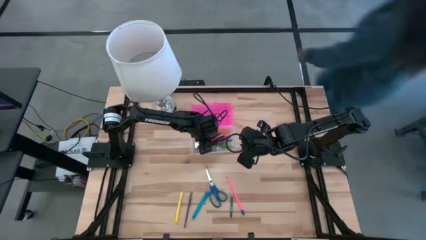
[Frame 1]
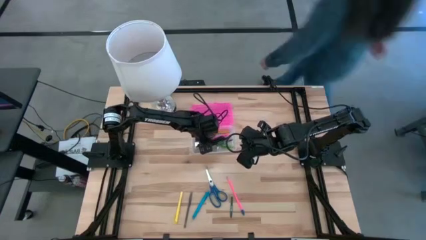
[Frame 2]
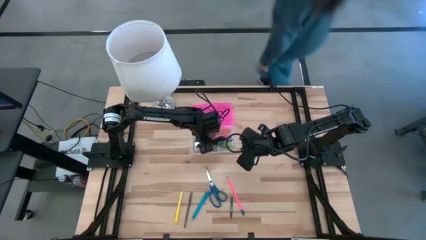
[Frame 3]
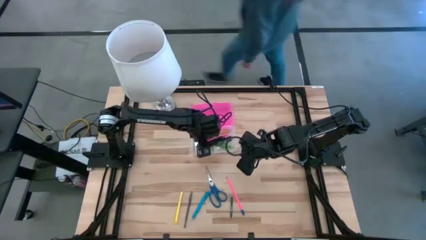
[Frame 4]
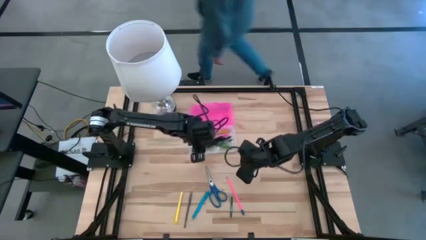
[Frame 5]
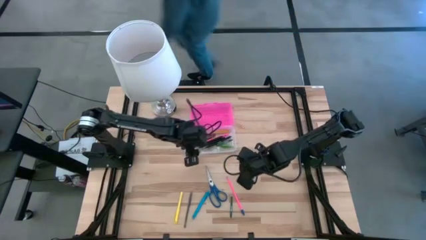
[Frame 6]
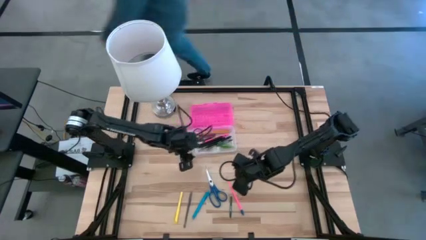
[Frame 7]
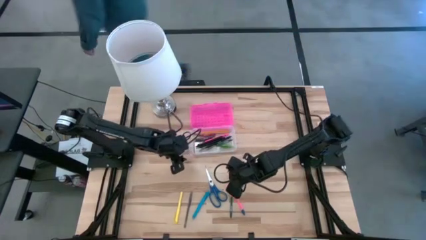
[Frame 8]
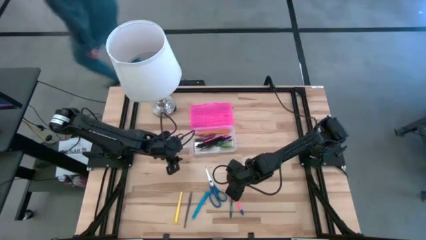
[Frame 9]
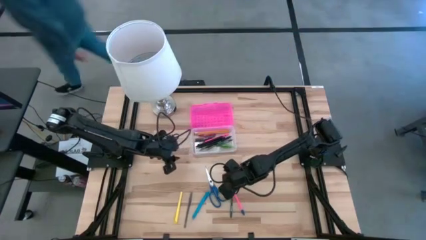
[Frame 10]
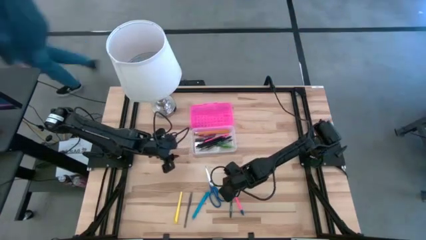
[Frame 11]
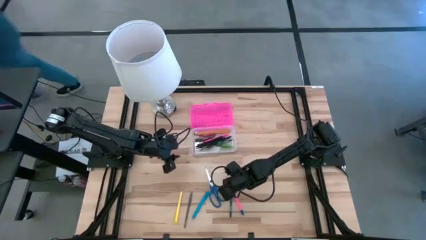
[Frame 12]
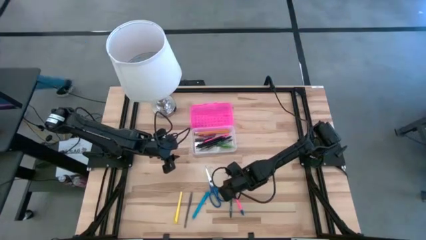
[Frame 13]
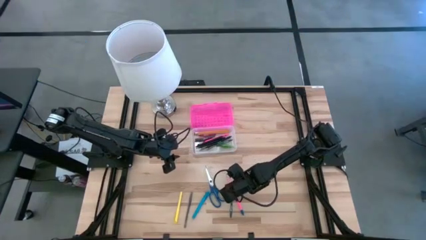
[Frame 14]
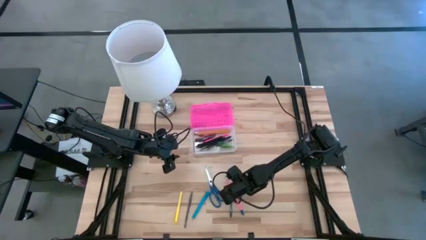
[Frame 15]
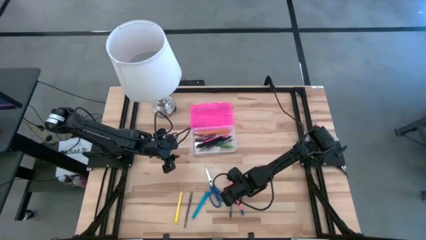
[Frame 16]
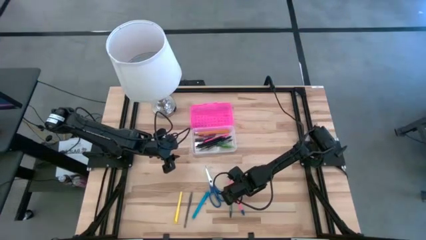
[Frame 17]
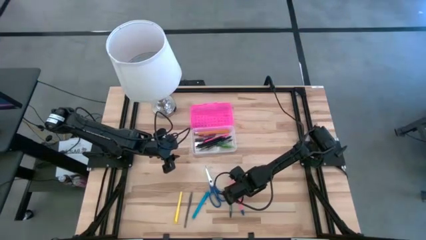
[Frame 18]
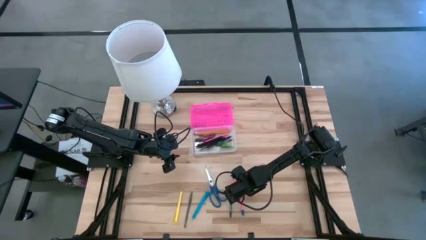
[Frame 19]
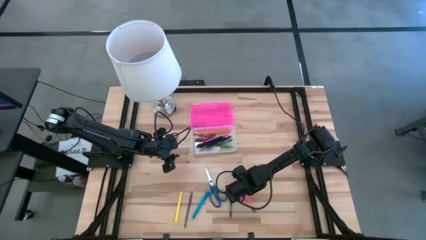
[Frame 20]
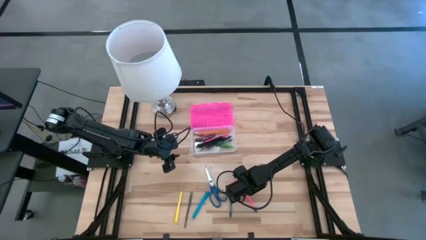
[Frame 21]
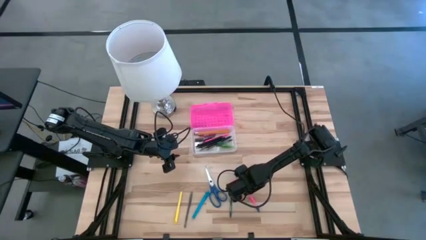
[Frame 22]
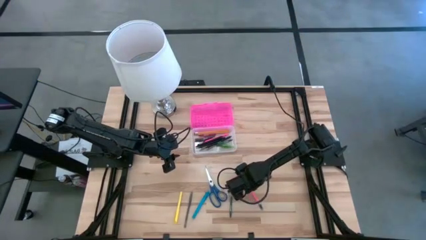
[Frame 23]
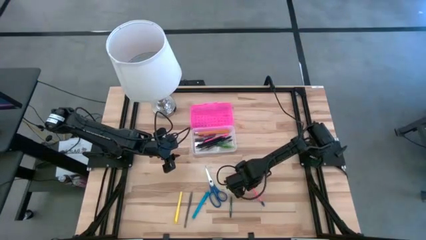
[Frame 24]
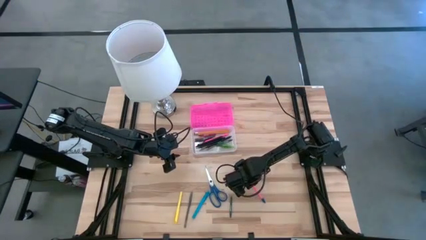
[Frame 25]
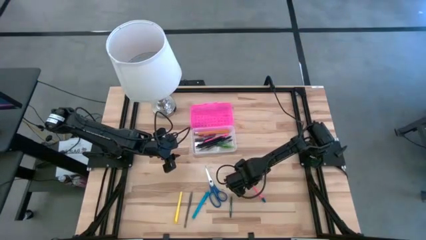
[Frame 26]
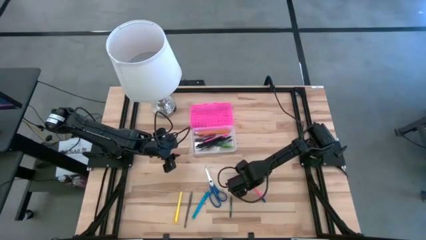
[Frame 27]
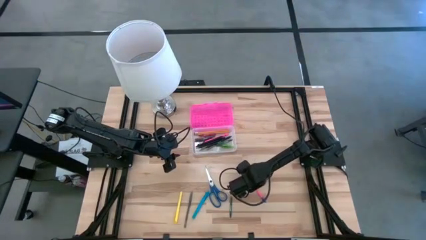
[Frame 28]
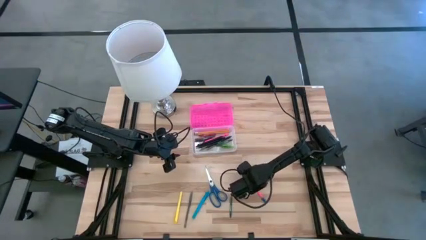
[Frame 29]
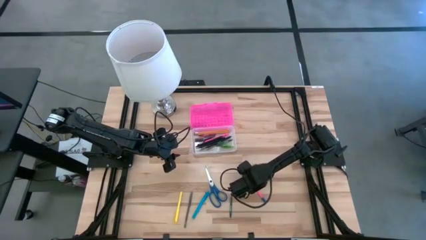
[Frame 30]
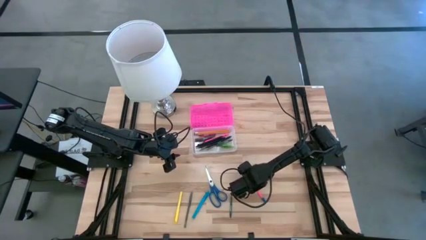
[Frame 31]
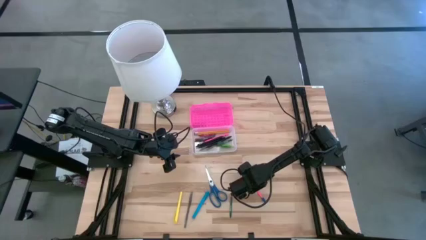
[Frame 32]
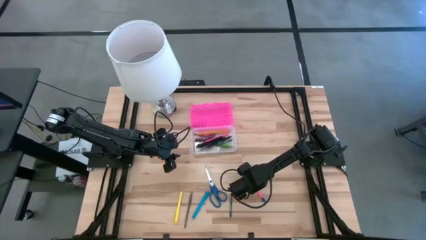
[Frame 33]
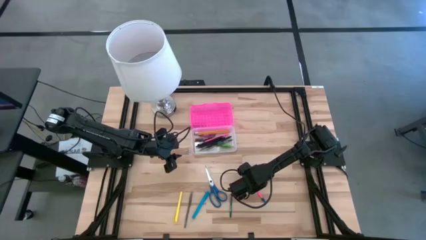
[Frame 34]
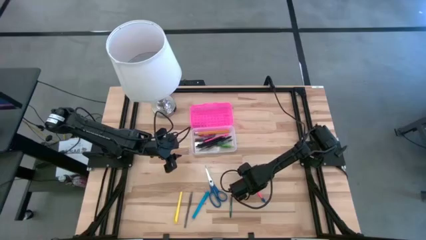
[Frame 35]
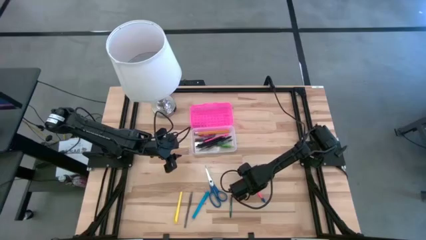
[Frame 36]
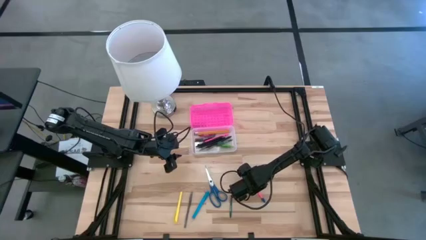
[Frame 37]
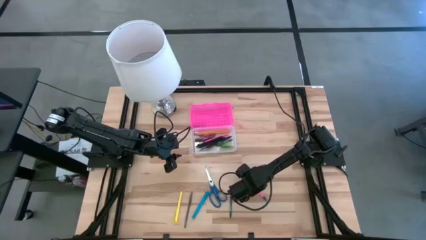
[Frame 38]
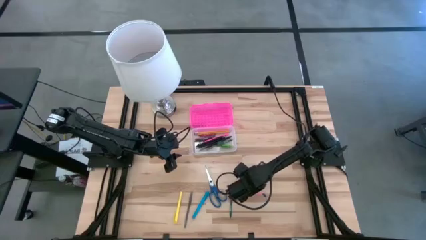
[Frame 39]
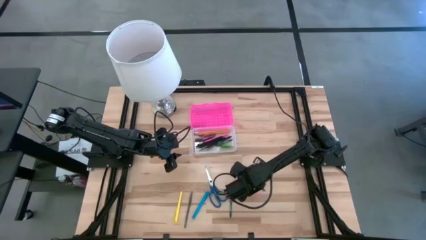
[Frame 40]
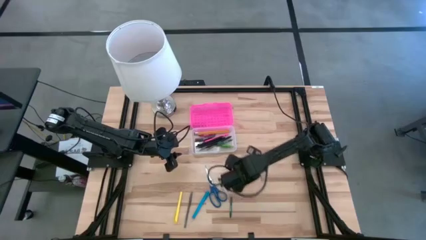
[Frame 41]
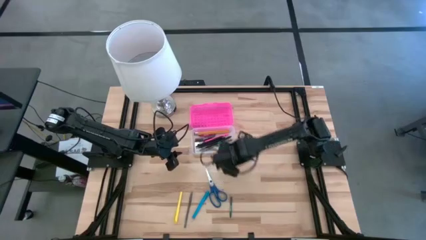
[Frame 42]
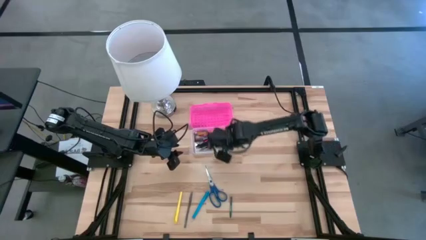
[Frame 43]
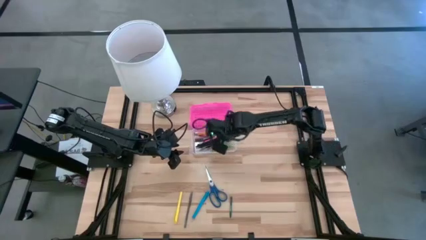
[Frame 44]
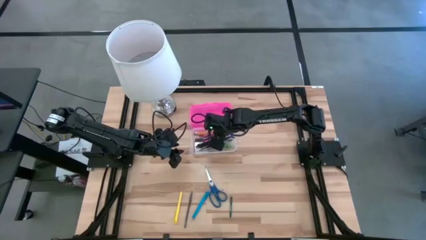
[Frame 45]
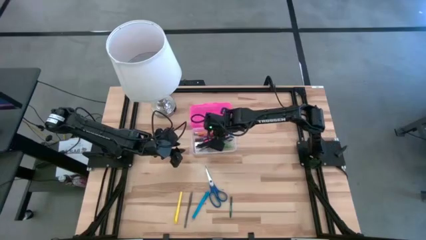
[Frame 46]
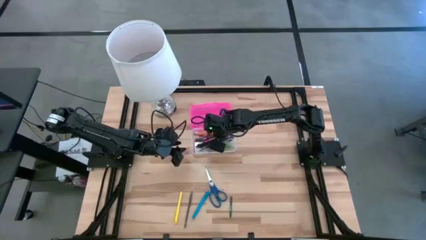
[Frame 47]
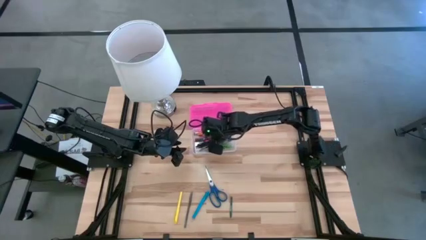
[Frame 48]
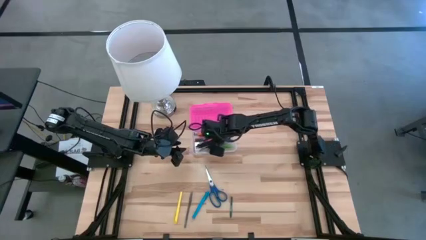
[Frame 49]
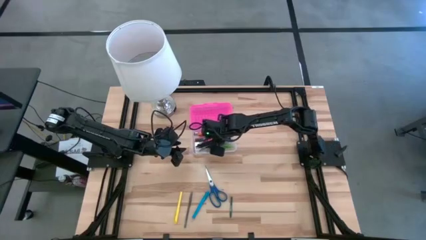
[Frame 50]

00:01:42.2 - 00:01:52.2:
Task: Pick & place school supplies into a supply box
Put the pink pencil into the supply box

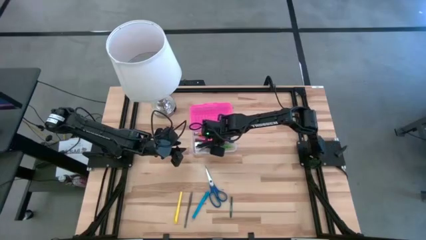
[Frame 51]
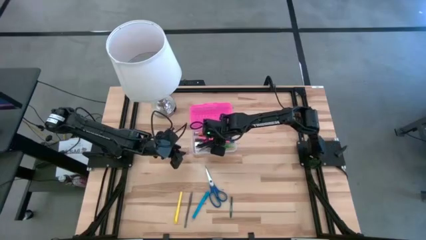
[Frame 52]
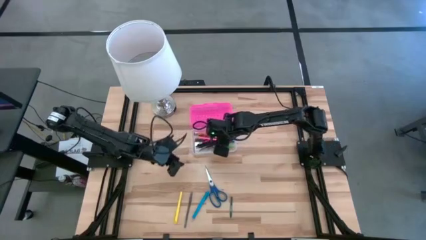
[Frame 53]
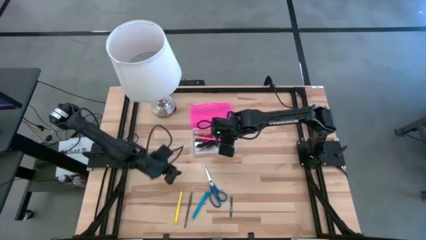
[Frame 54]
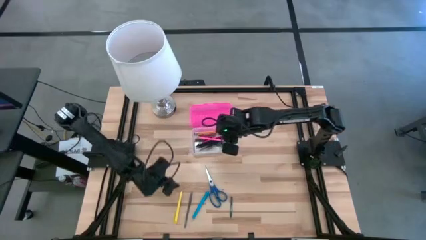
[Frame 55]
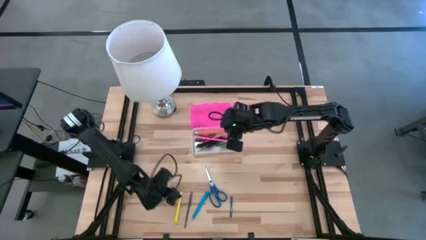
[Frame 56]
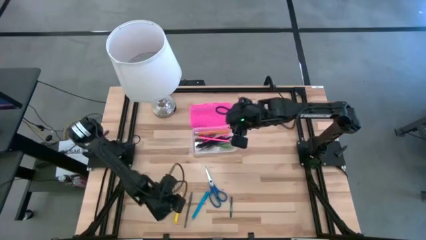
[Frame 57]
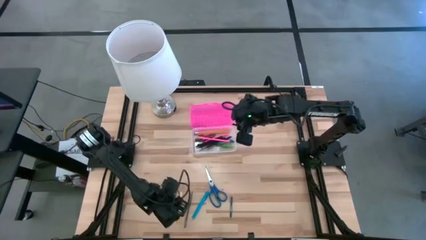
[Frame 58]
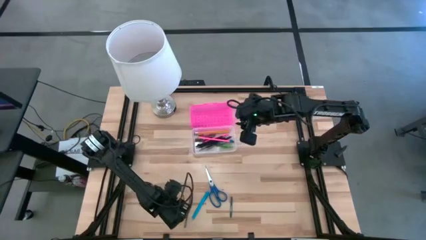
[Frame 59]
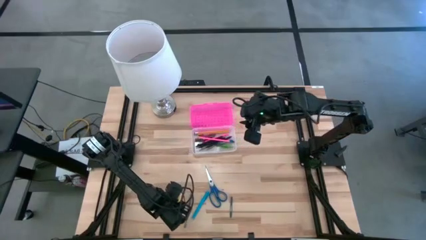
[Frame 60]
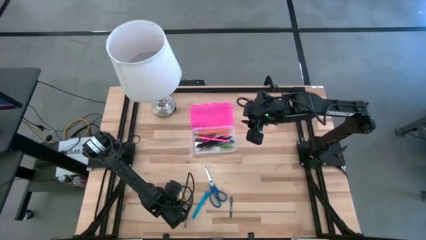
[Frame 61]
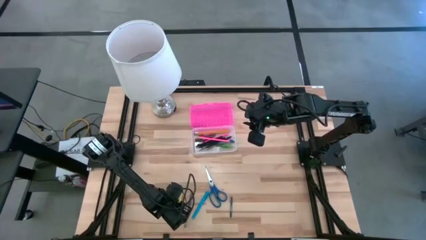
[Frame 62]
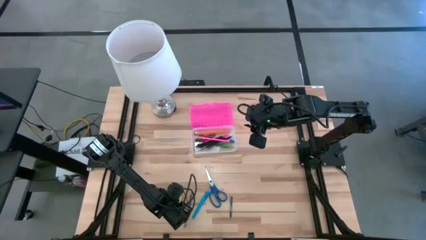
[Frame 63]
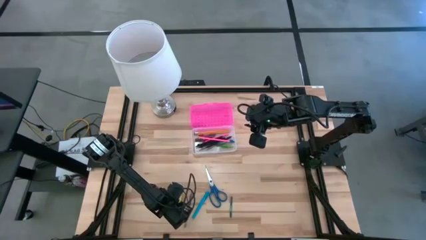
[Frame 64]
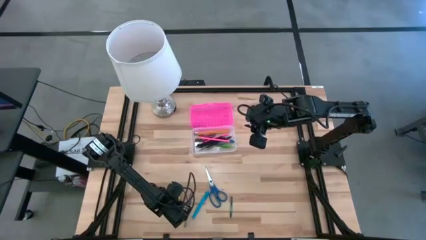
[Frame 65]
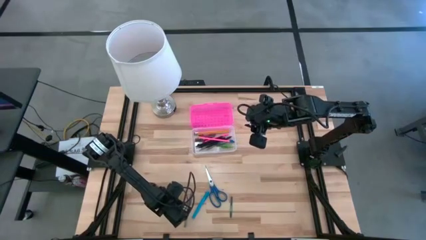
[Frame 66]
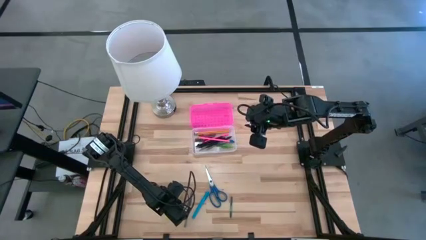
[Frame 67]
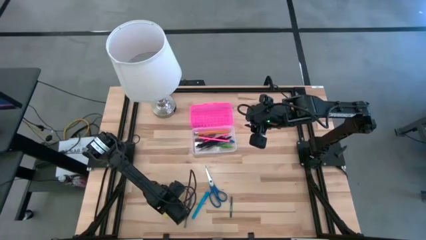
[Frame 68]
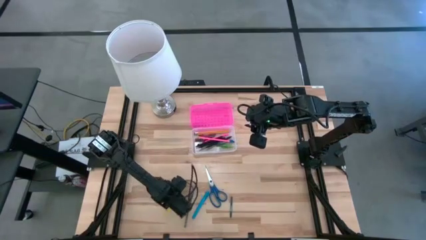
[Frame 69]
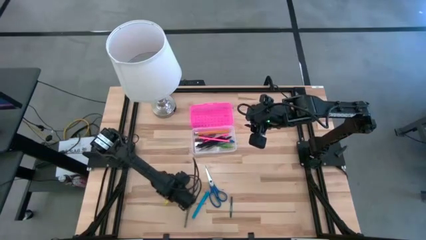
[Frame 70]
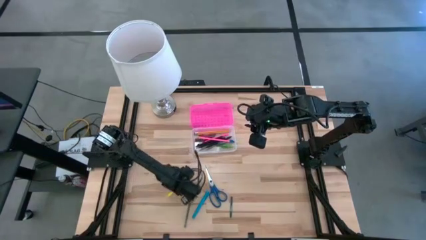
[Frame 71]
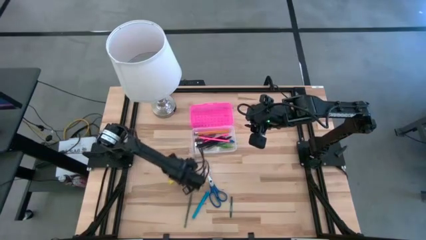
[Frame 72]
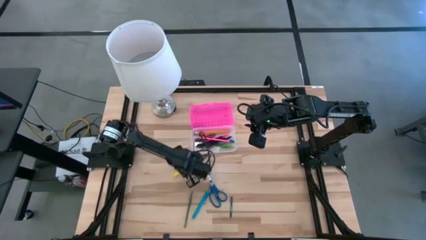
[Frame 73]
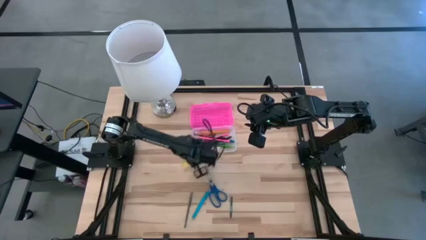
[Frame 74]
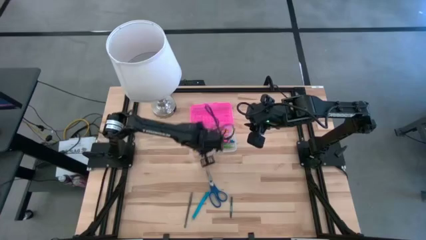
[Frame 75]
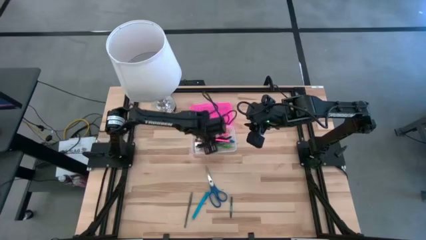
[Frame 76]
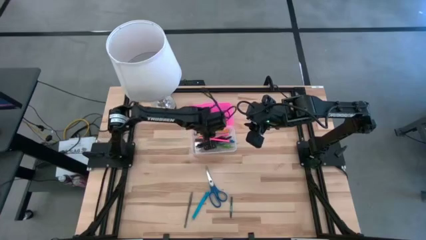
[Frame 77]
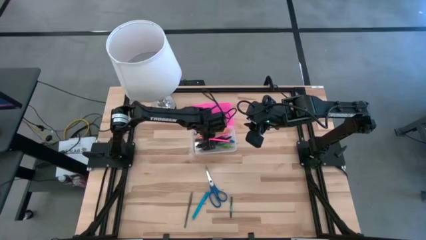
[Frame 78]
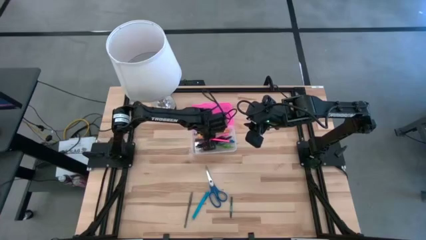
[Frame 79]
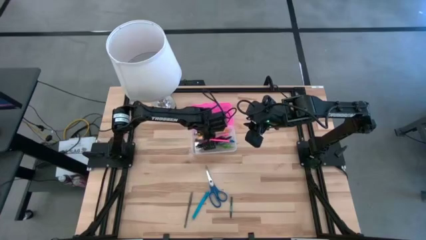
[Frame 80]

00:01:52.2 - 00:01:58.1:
Put the yellow pen into the supply box

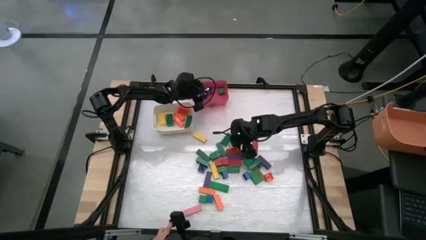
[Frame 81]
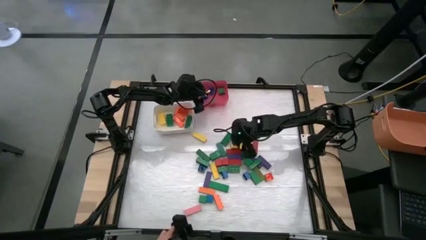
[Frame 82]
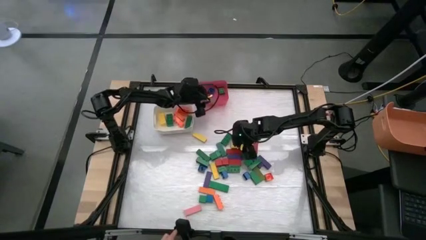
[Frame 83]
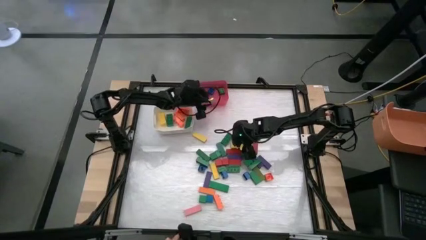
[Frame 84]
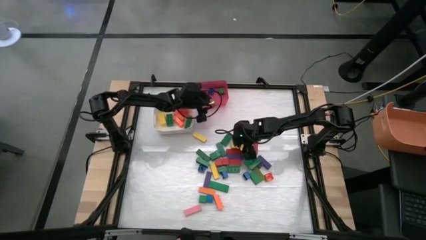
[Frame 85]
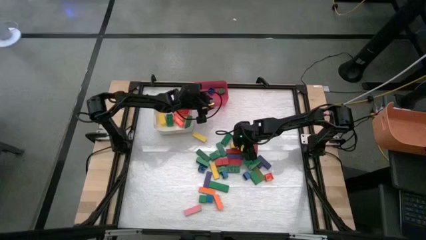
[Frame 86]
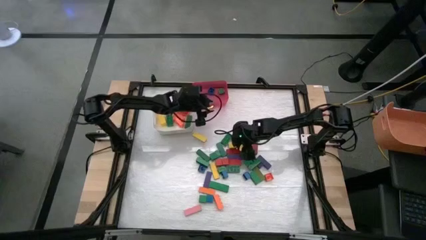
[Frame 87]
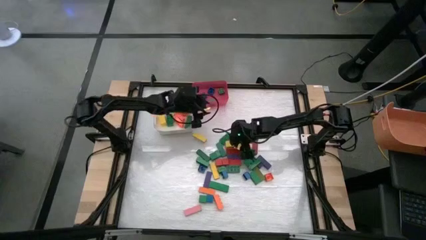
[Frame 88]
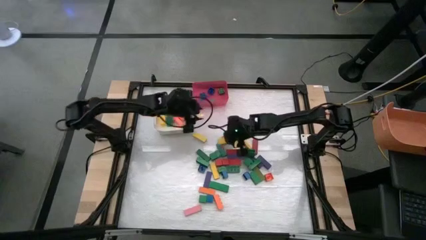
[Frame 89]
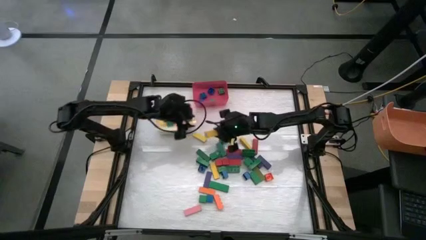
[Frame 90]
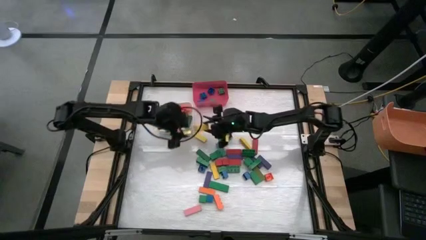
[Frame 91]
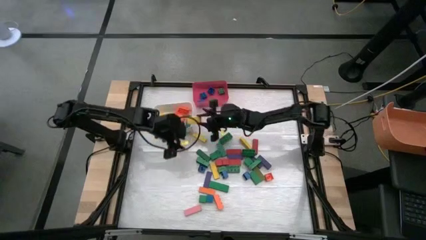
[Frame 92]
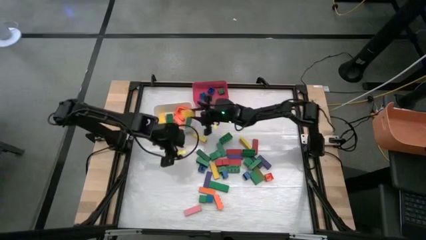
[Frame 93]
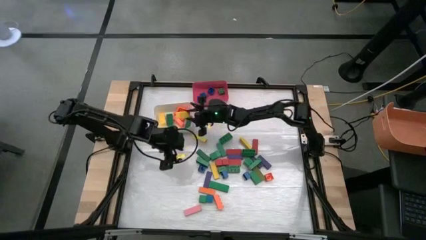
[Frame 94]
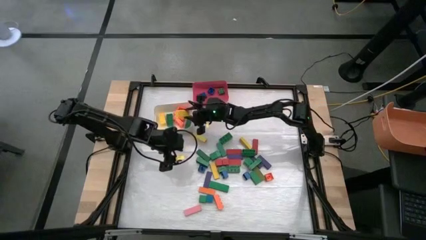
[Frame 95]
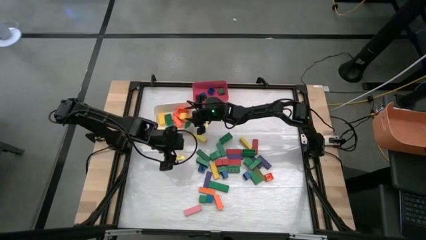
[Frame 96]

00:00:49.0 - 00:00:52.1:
Task: Sort blocks by size
Put the large yellow wooden block into the white bin
